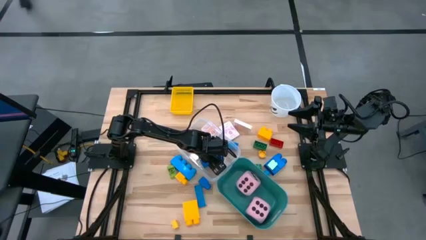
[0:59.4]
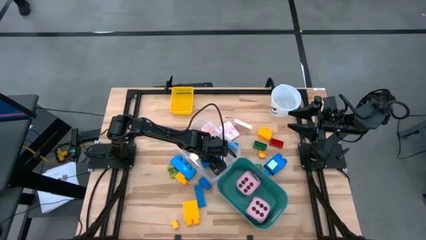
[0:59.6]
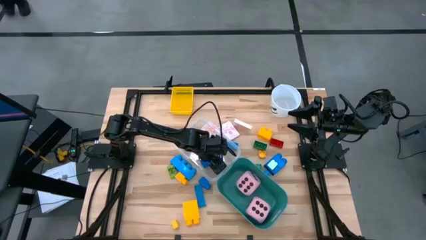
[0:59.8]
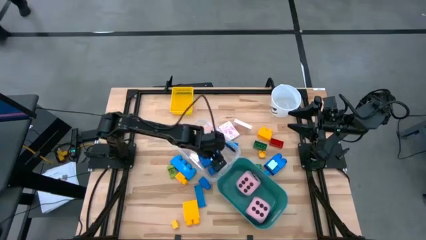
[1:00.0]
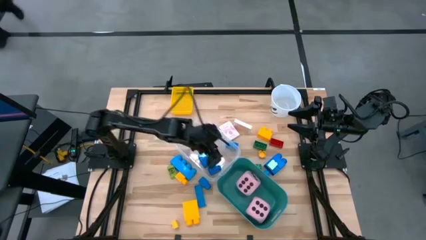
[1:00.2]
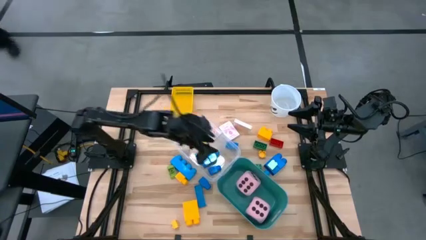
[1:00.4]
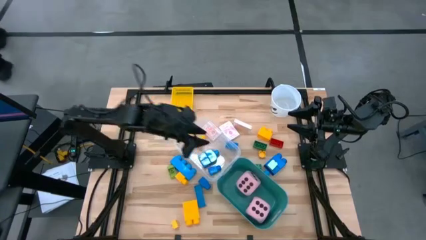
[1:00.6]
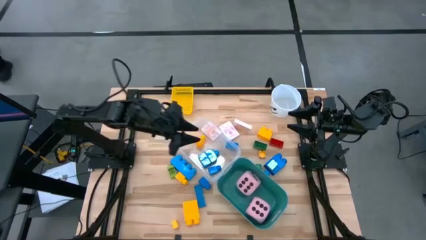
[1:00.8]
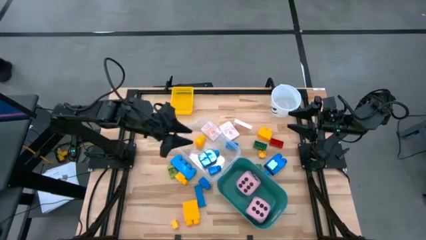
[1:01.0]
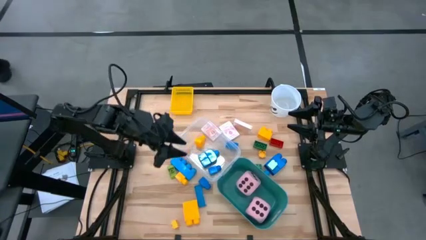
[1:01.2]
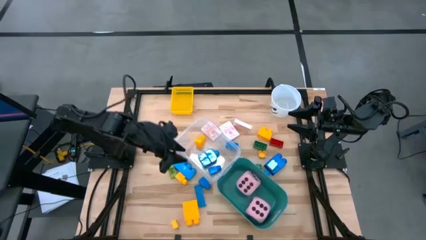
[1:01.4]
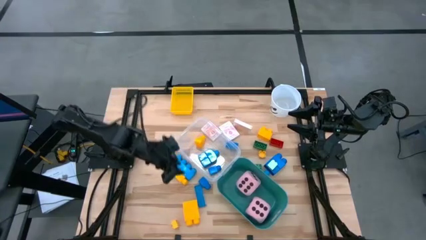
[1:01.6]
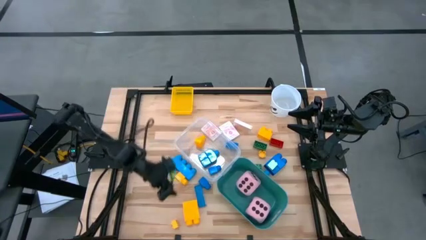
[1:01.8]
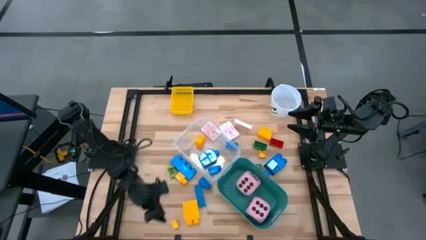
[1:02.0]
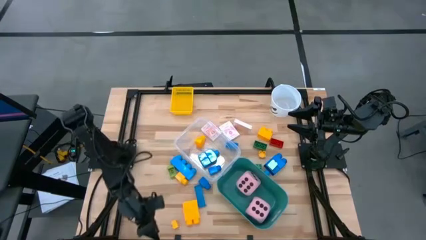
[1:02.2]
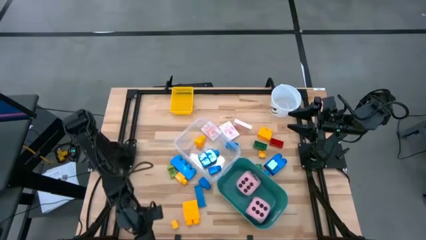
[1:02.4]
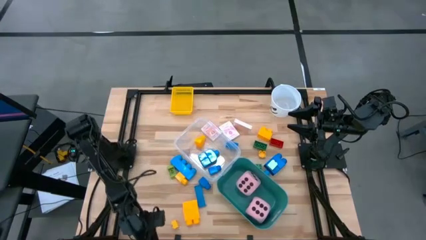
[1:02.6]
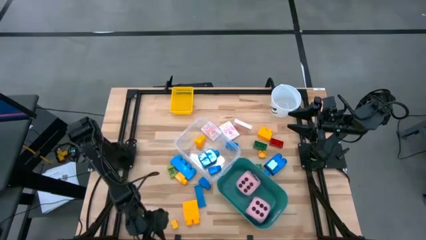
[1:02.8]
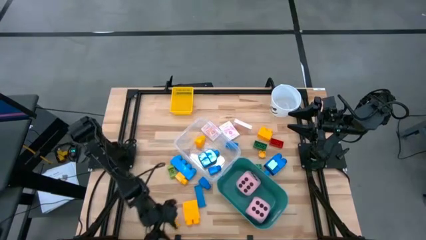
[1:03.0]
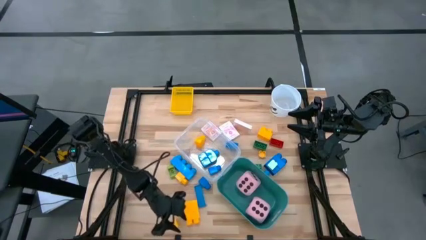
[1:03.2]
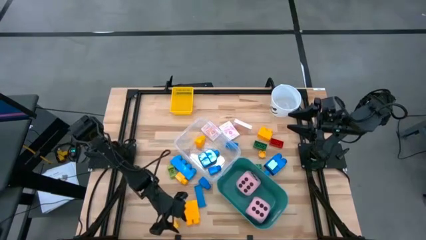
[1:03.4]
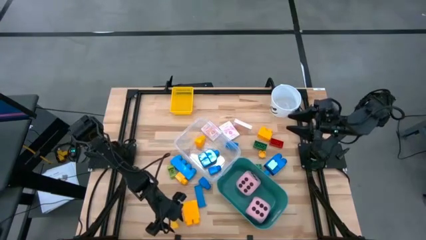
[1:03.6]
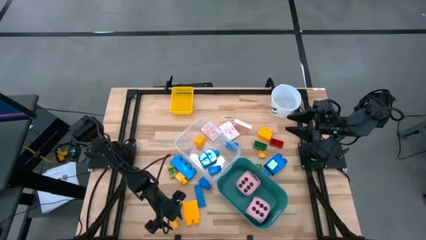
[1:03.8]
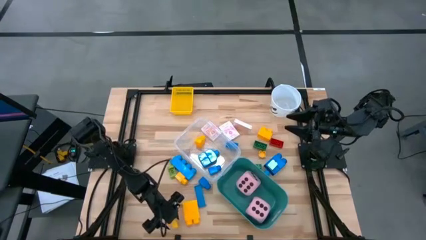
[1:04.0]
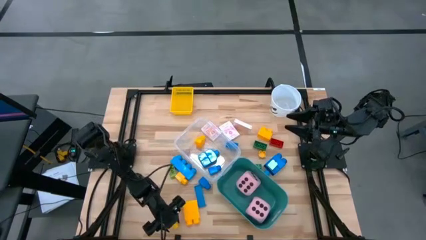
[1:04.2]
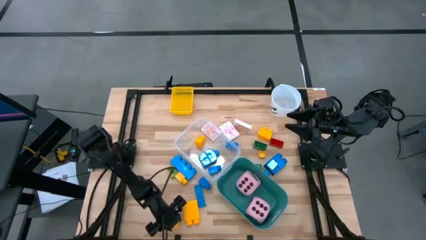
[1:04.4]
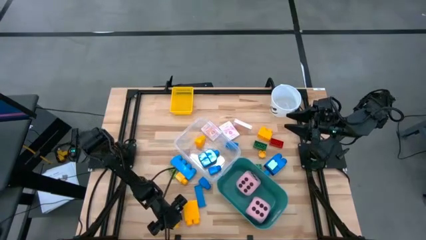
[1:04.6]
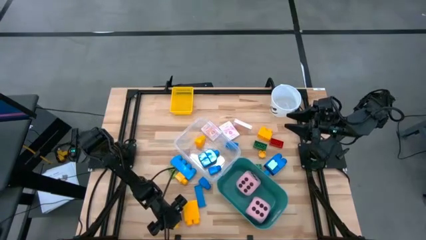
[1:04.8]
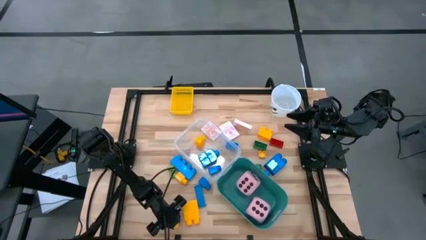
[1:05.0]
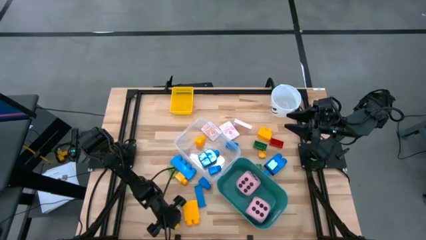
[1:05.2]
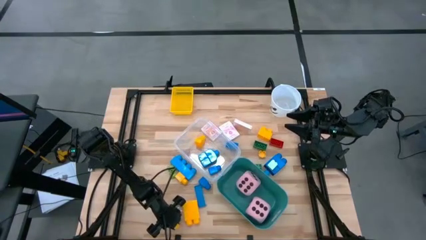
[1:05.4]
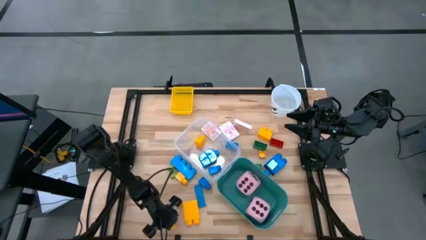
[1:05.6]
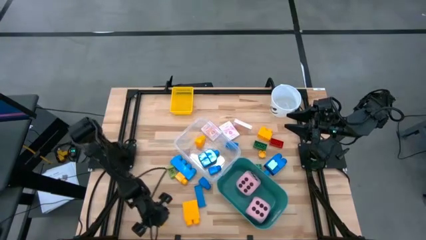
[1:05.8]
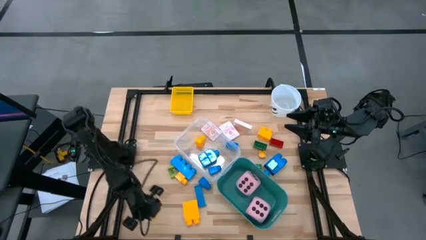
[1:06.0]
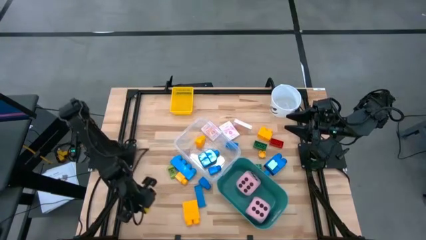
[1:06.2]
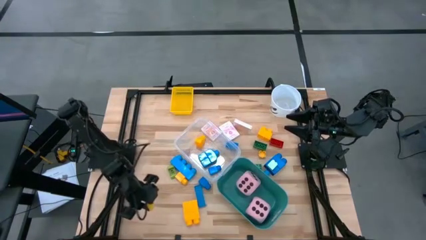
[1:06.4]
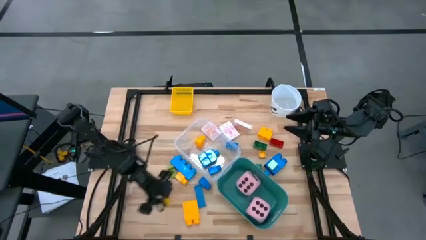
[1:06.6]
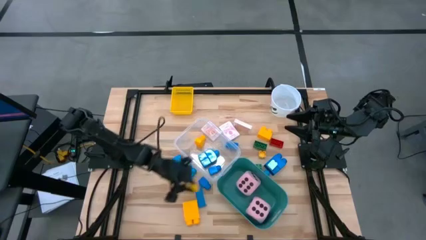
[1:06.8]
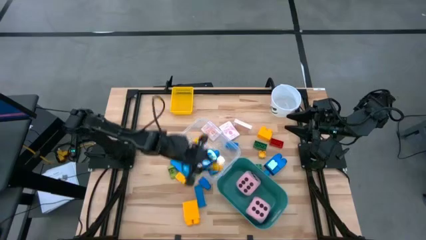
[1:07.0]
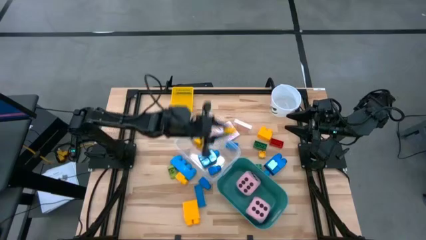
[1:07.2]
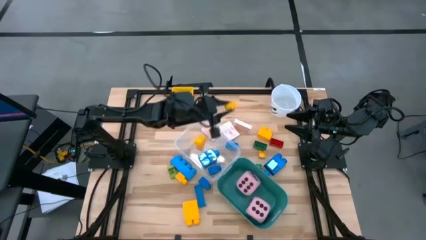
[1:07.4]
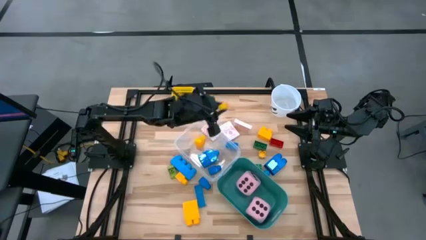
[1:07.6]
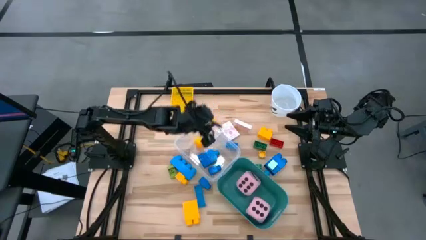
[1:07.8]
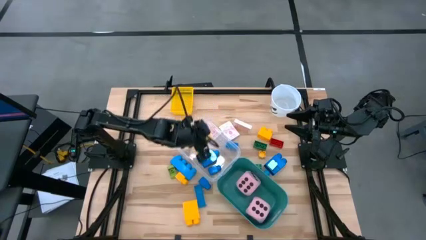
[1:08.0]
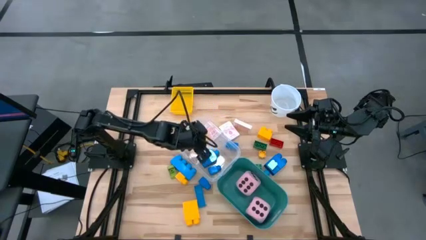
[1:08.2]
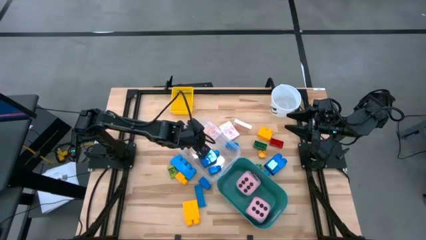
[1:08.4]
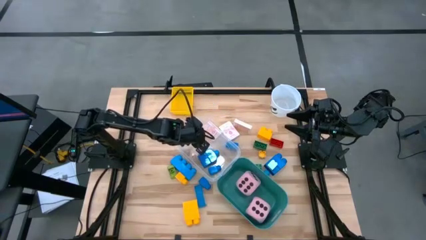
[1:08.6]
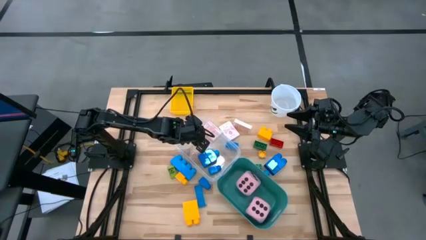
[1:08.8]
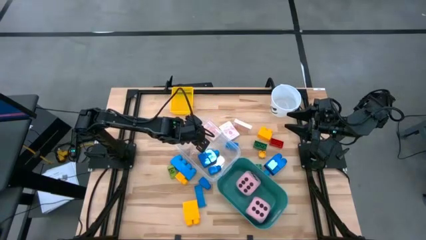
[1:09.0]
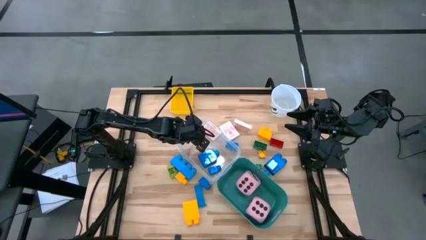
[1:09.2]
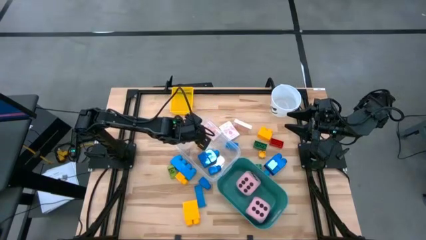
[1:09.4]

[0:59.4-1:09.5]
Task: Pick & Place Toys
Put the yellow game piece into the transparent bin

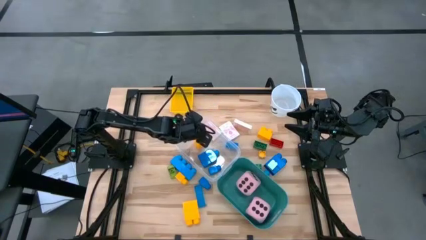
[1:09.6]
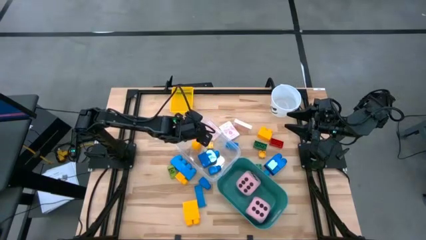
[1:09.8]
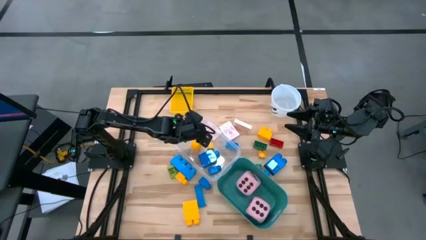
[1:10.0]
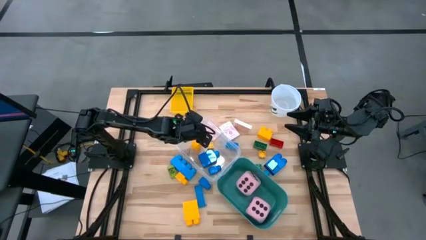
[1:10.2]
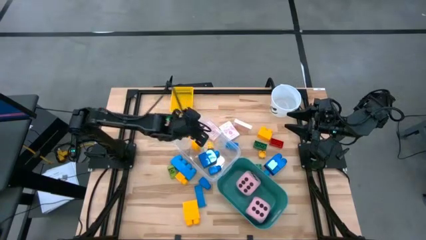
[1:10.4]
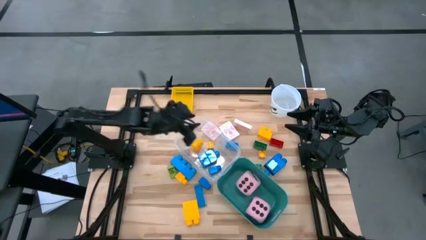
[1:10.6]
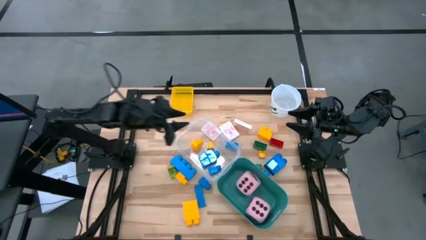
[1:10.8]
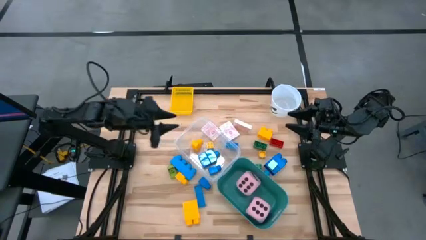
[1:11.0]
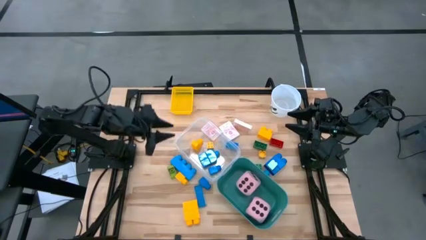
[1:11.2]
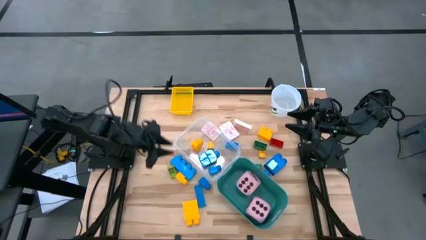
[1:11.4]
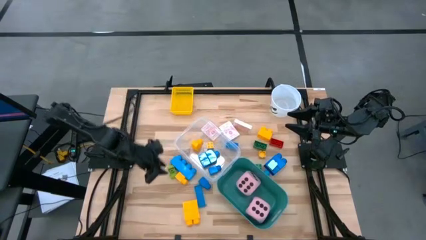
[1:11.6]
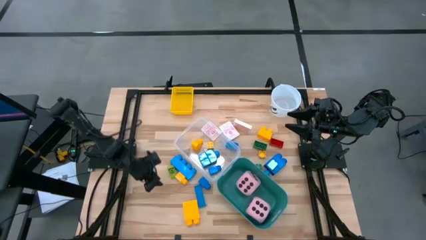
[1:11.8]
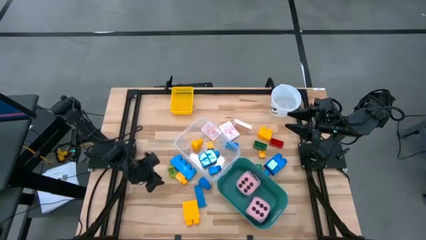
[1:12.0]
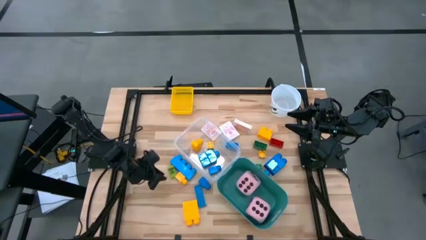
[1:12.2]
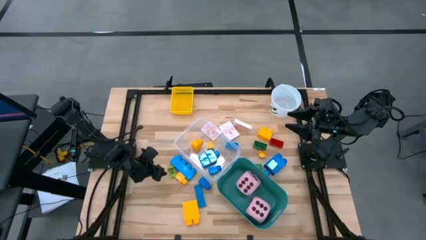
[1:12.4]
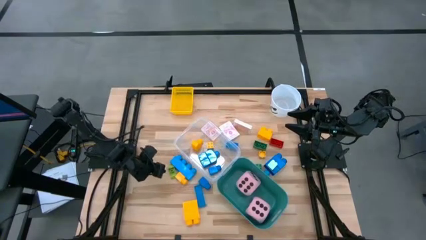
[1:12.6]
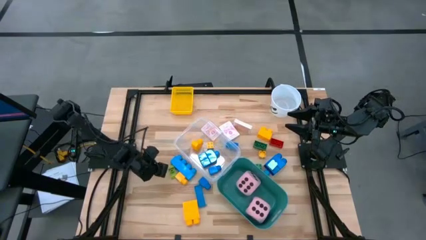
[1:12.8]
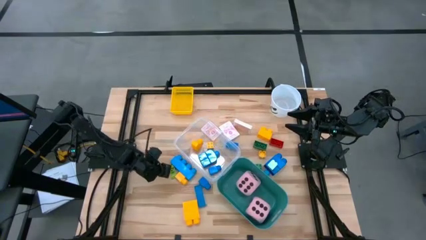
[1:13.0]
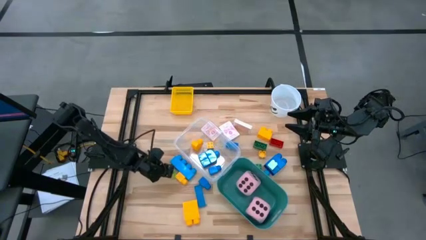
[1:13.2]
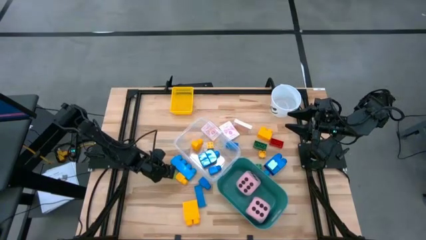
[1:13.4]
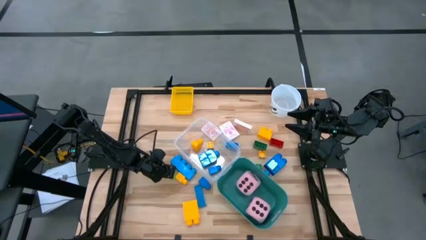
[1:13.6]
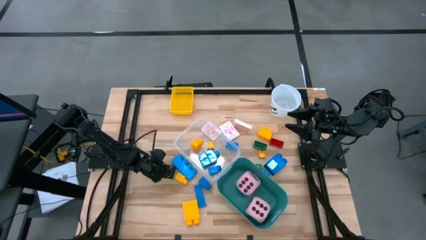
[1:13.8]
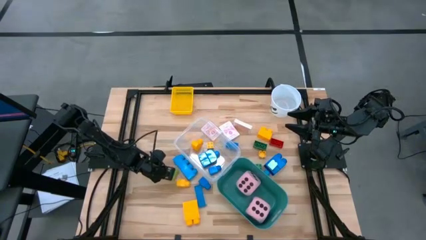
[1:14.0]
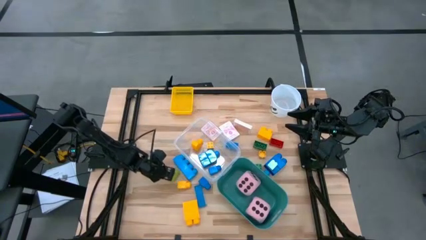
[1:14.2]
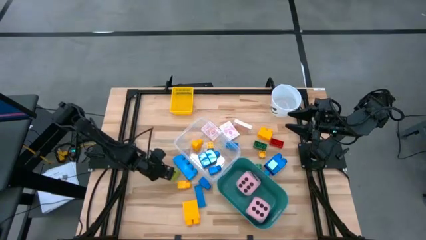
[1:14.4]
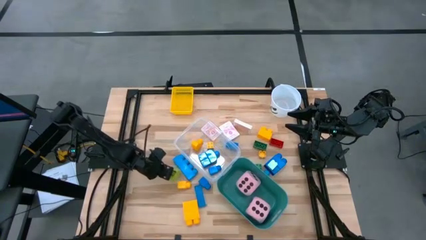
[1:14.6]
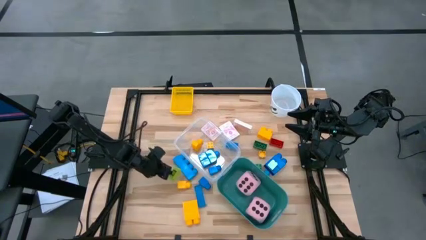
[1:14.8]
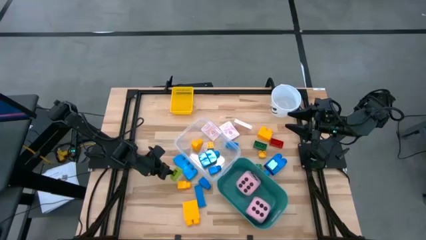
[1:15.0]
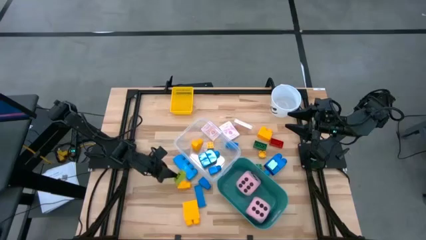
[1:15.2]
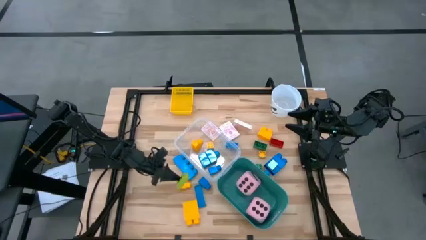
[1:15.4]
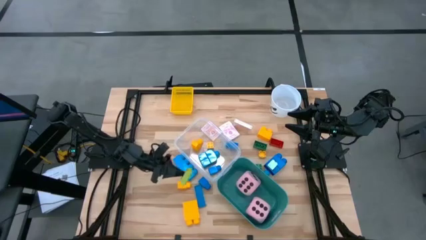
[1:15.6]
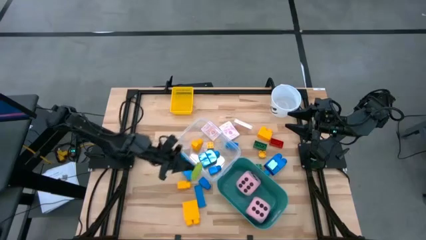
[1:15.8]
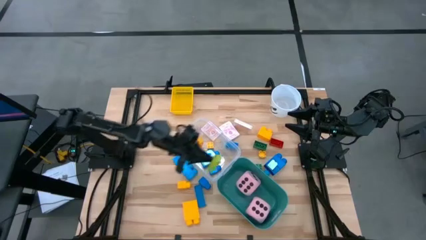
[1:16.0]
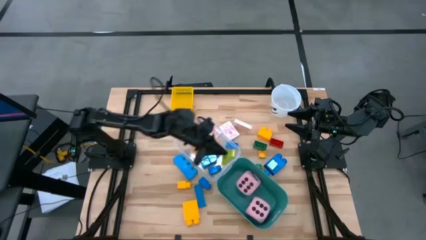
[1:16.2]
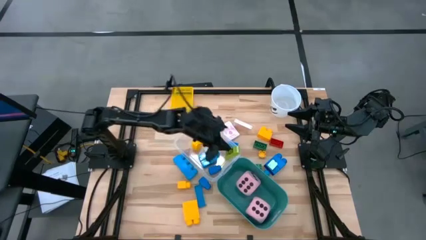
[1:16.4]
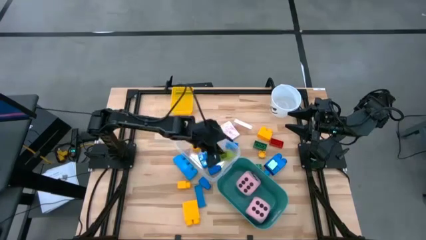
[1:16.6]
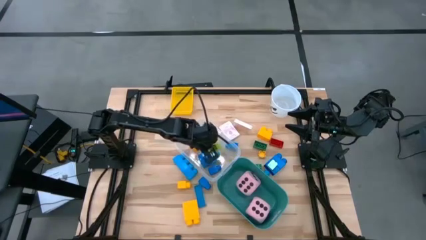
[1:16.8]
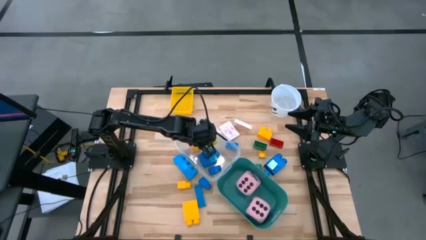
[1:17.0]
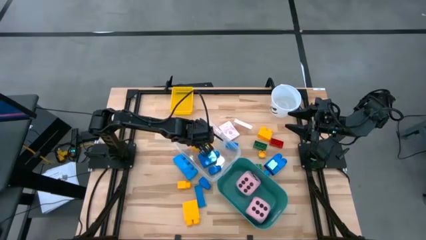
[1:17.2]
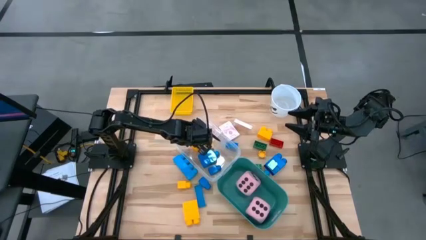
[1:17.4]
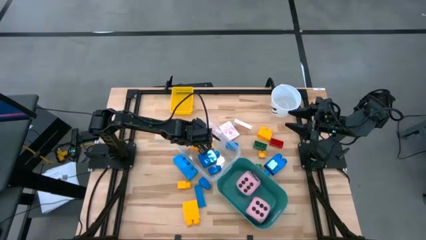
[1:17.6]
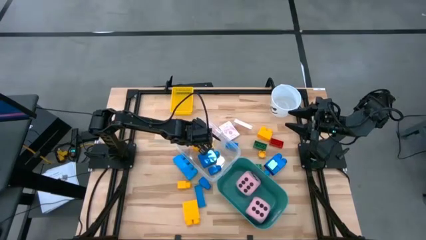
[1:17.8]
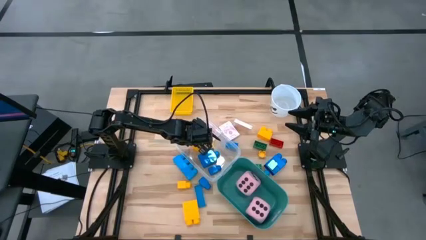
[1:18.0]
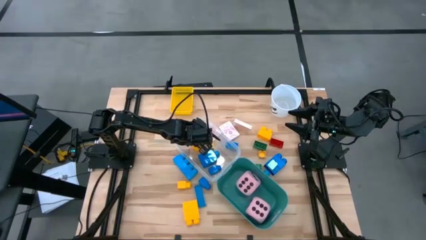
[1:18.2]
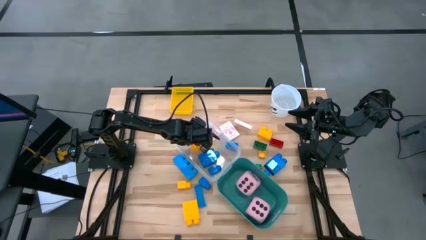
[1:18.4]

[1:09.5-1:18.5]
Put the green game piece into the transparent bin
